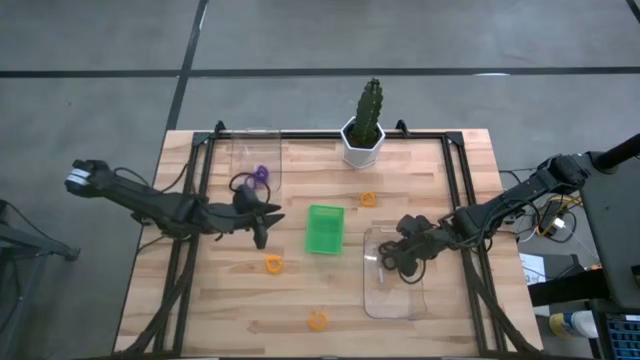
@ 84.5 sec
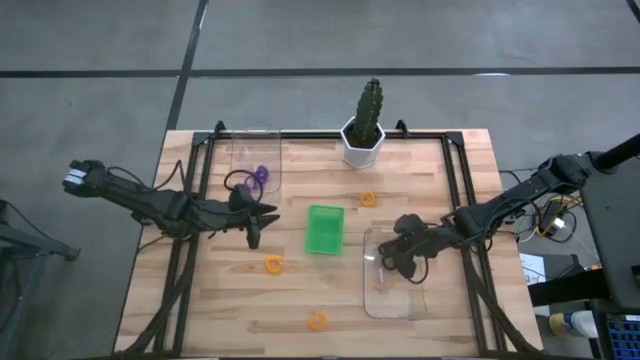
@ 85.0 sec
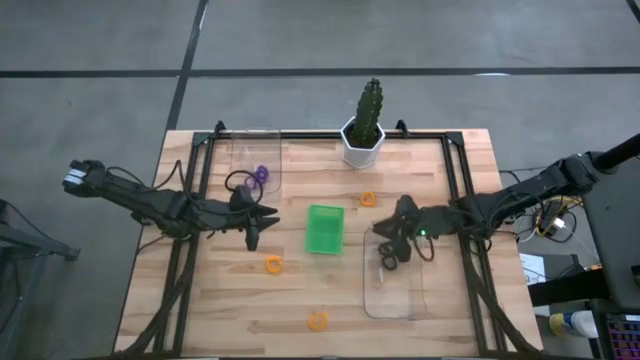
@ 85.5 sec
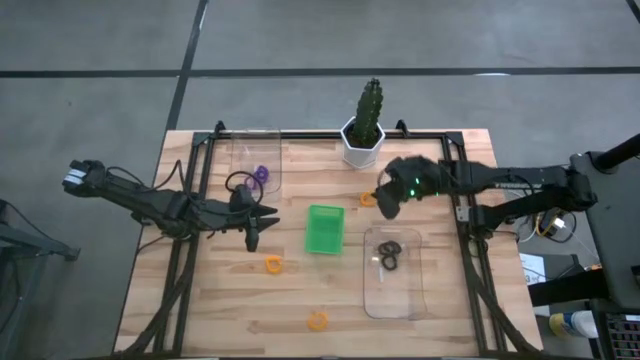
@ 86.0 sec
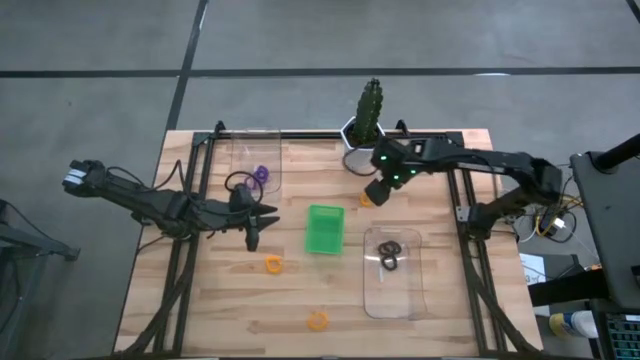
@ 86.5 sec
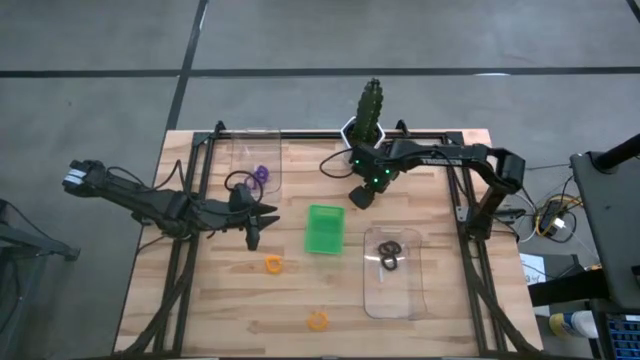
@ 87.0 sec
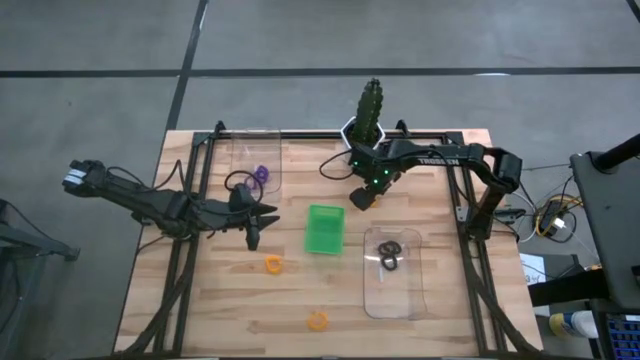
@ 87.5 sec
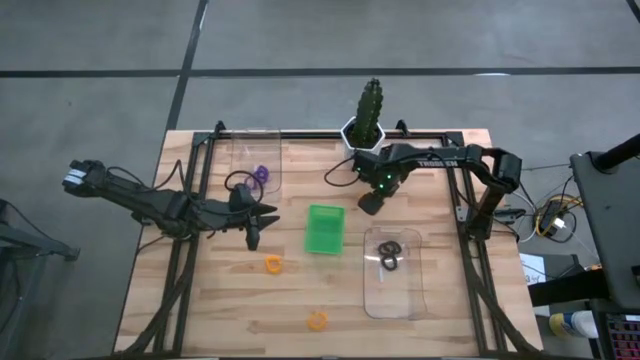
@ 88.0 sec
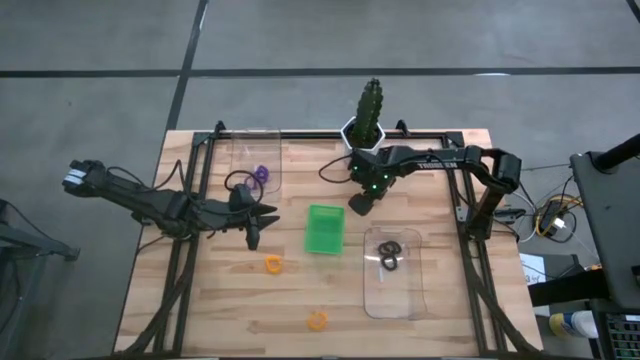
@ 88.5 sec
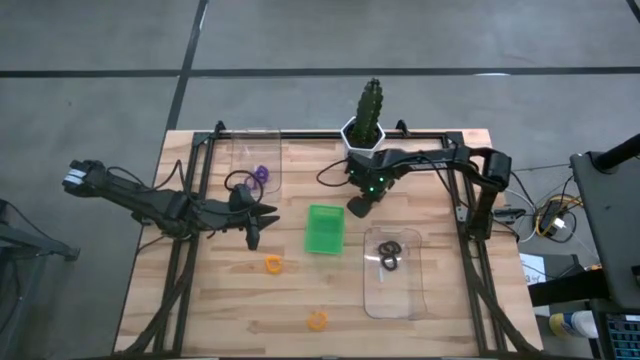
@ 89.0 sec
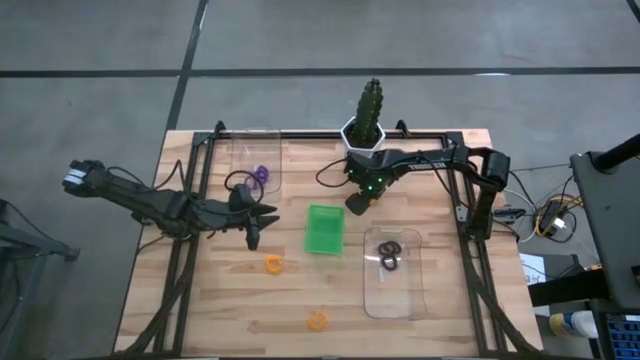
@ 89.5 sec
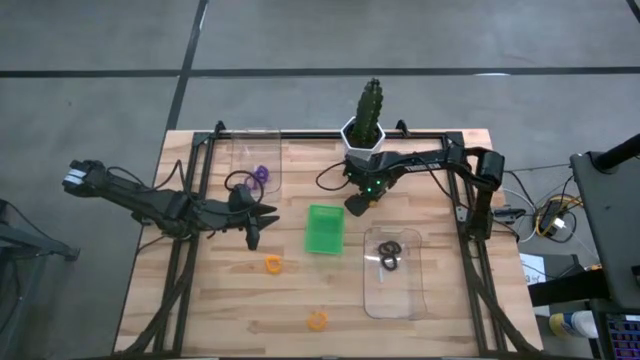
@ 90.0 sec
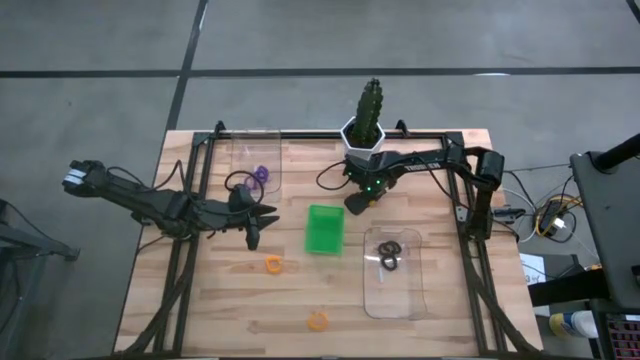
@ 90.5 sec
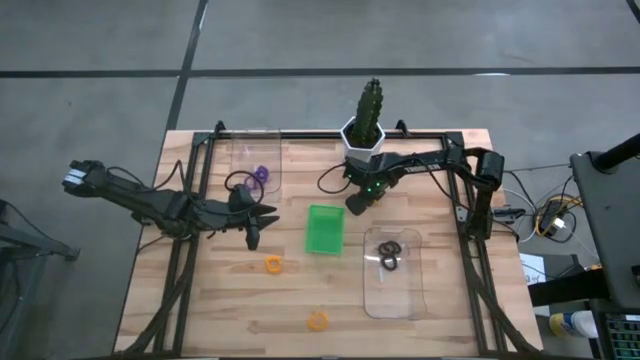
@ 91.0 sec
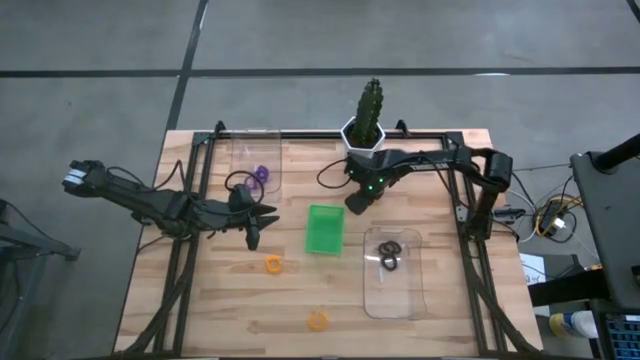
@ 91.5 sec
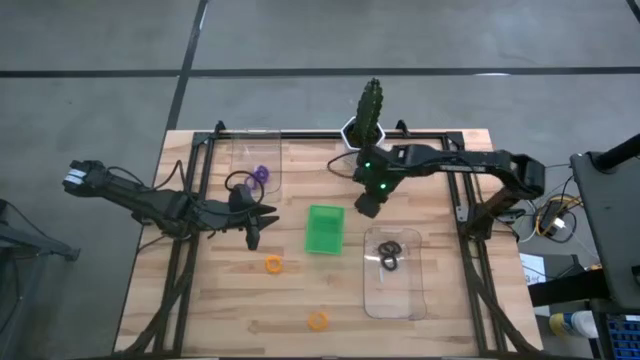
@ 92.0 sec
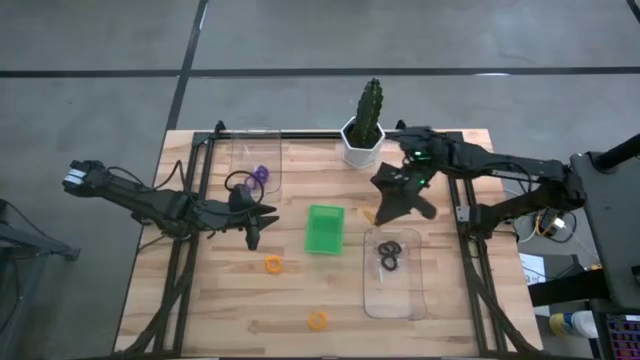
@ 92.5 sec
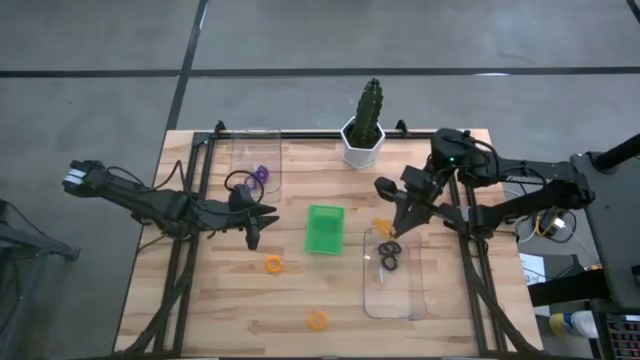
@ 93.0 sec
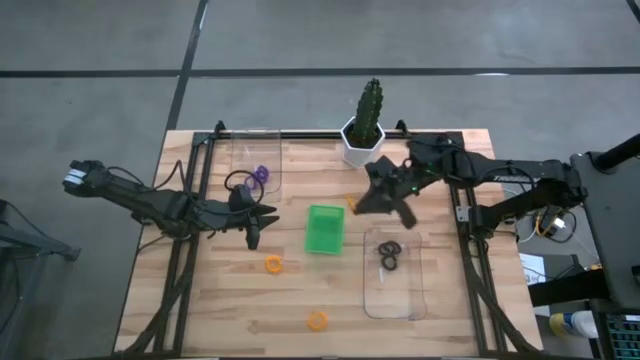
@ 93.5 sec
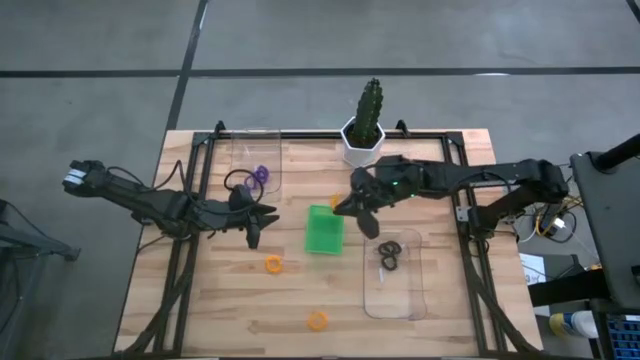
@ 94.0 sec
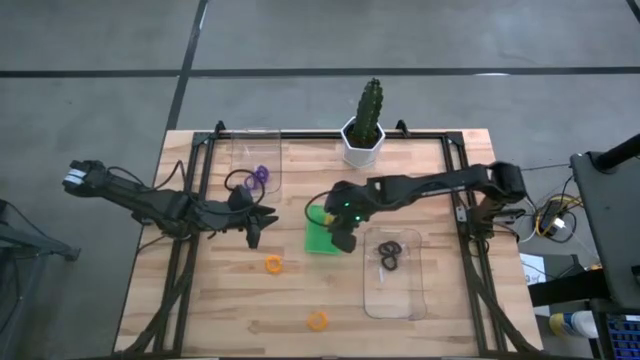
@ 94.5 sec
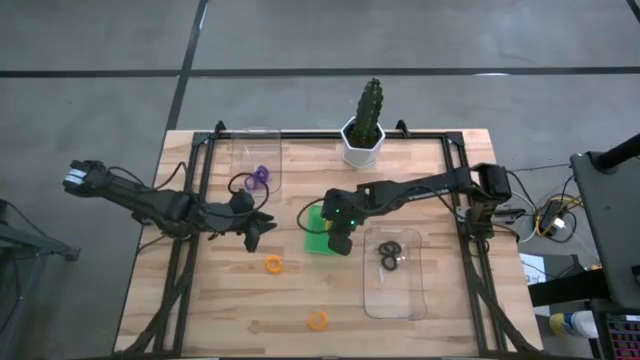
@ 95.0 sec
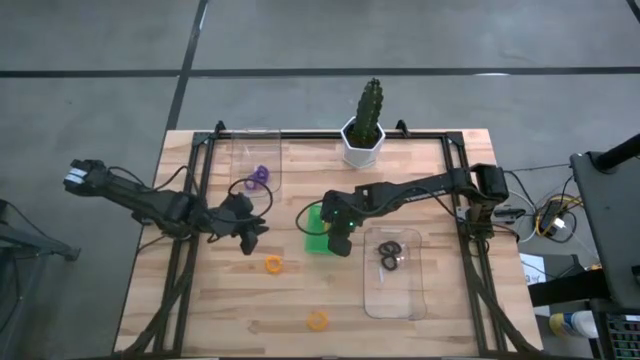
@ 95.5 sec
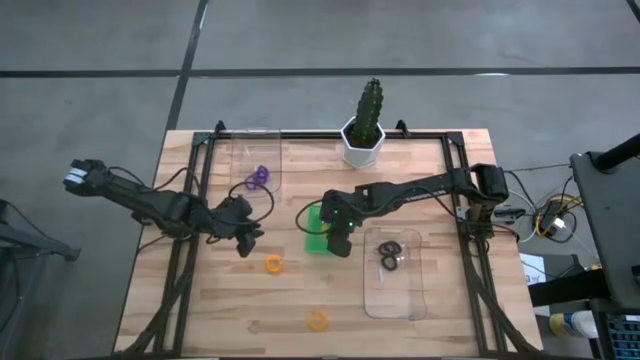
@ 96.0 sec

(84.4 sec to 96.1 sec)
Task: Sort spring keychains
Put the top orange spring keychain into the green bin

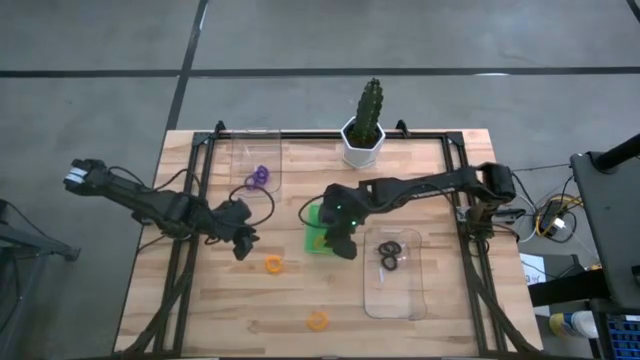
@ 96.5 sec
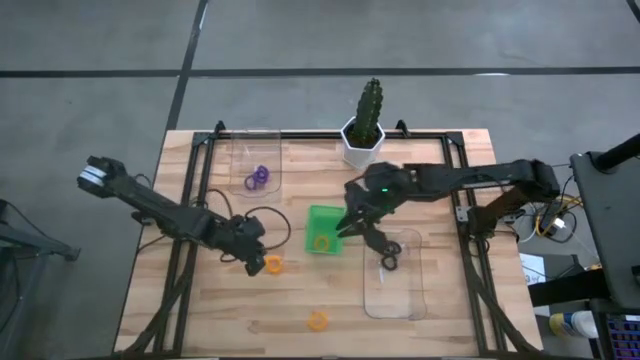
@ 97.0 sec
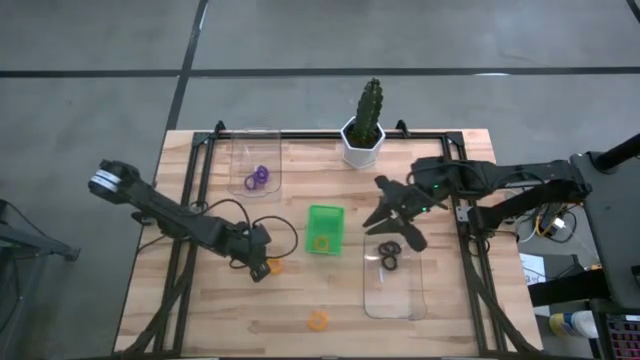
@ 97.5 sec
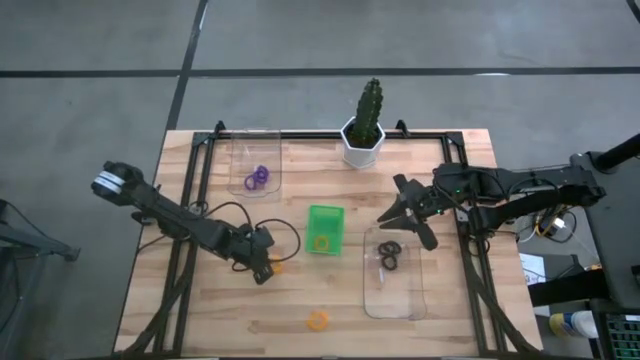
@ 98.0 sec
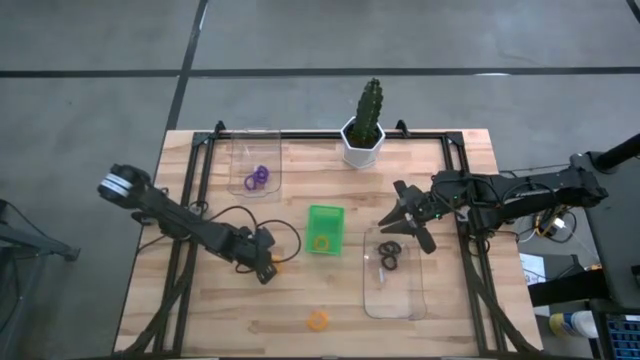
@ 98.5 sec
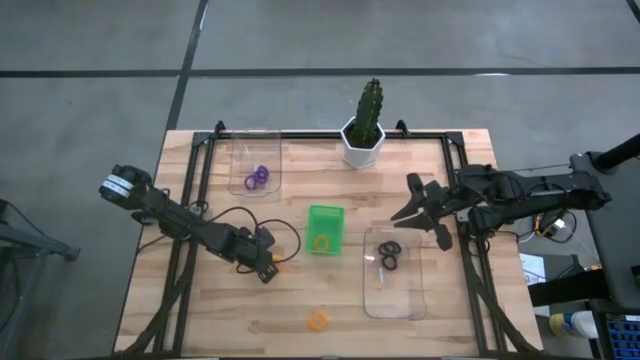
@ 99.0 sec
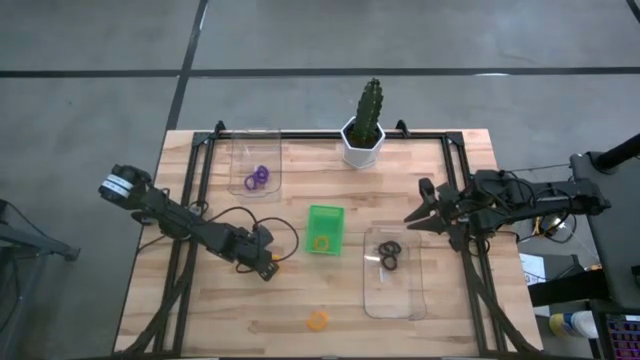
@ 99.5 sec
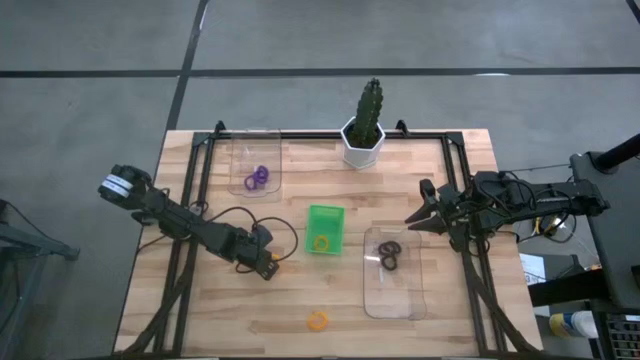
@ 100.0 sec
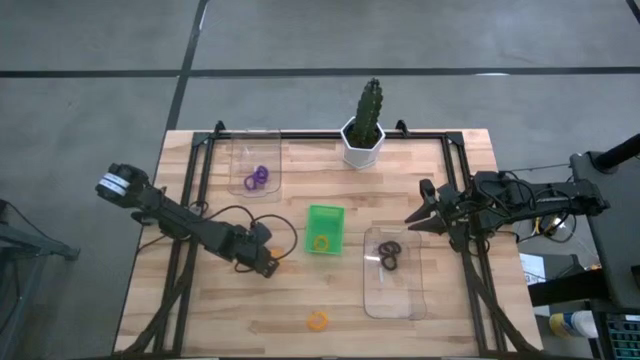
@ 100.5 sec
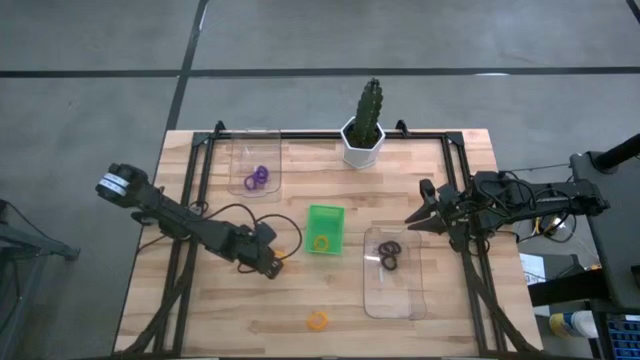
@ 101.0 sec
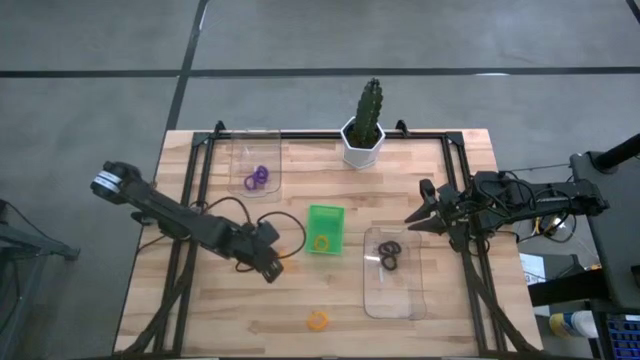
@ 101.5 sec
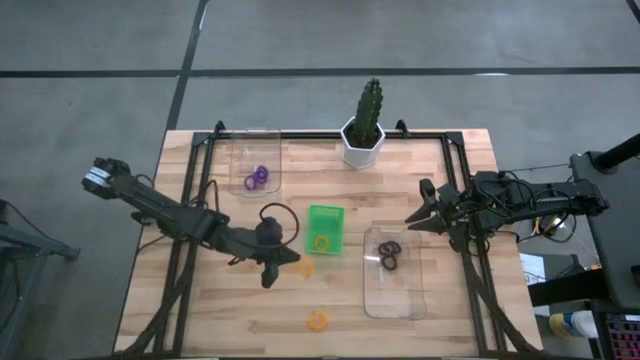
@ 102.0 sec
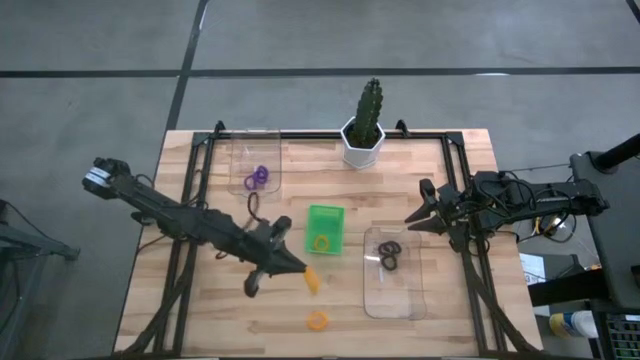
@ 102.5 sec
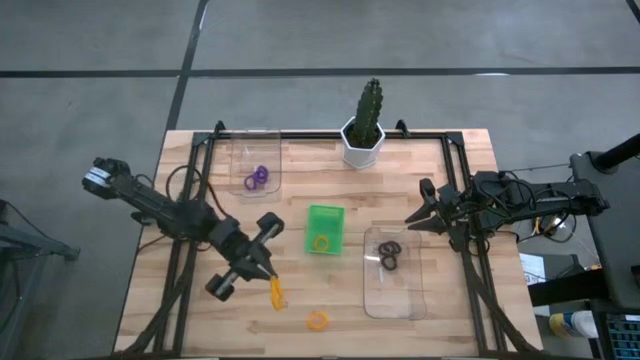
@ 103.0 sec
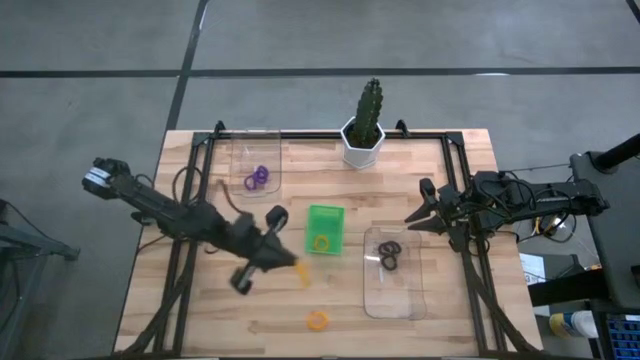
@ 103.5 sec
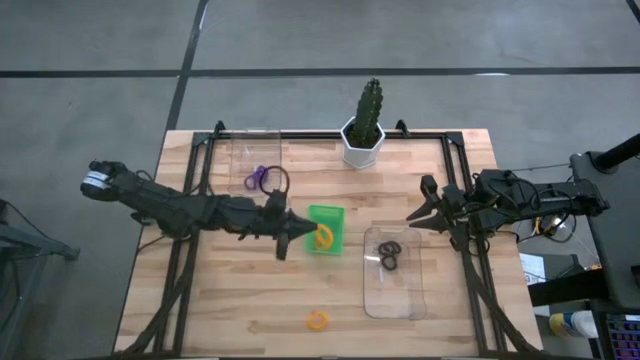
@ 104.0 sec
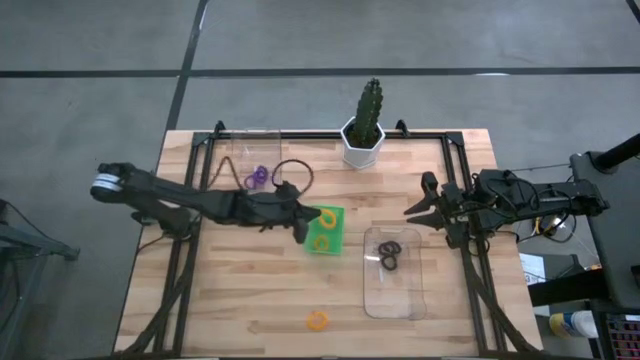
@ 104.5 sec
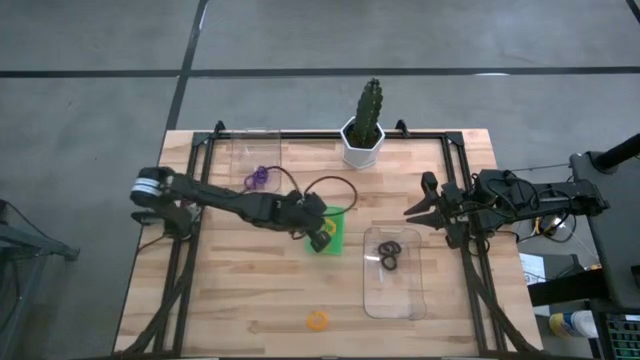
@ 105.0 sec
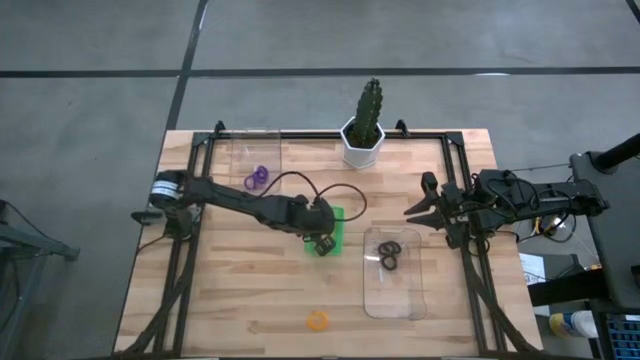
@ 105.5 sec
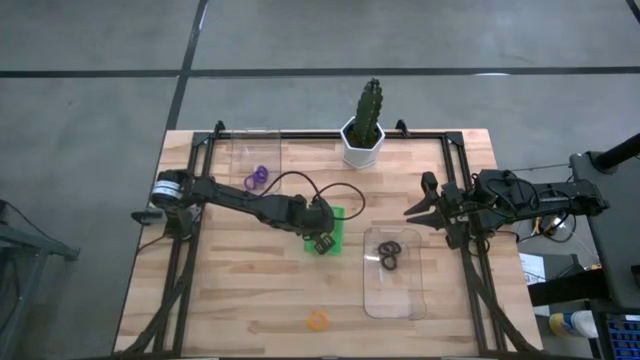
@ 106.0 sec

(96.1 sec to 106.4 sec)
Put the top orange spring keychain into the green bin
